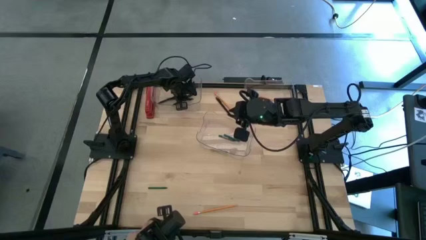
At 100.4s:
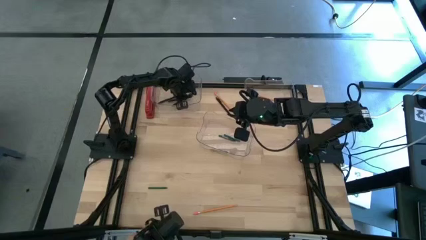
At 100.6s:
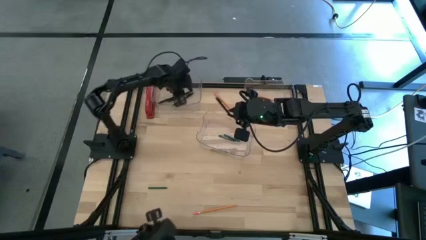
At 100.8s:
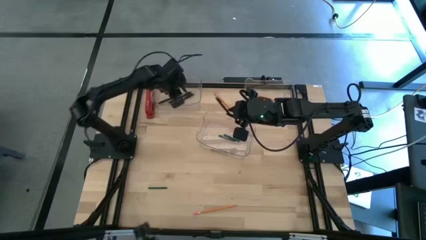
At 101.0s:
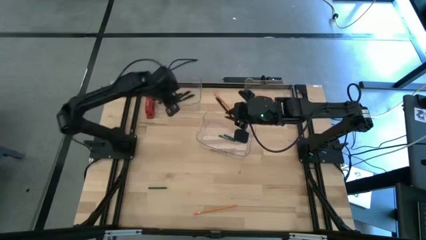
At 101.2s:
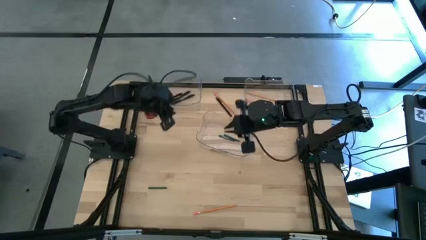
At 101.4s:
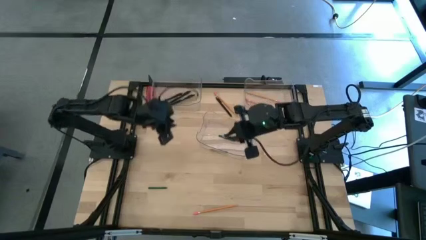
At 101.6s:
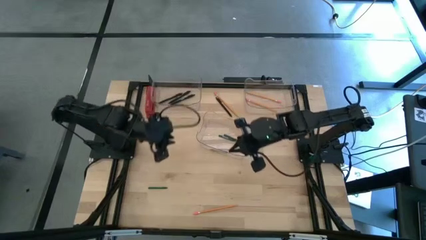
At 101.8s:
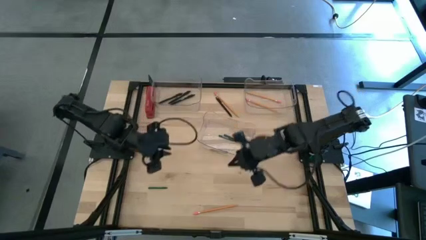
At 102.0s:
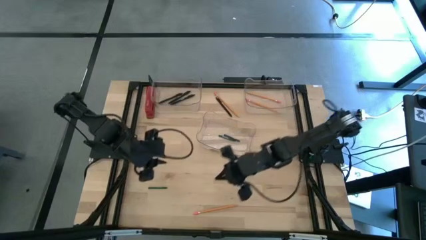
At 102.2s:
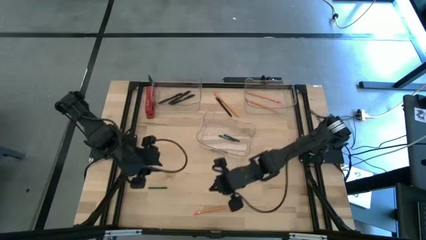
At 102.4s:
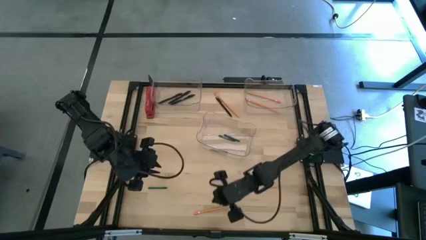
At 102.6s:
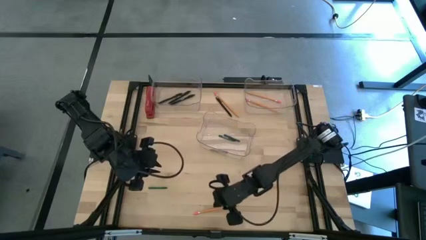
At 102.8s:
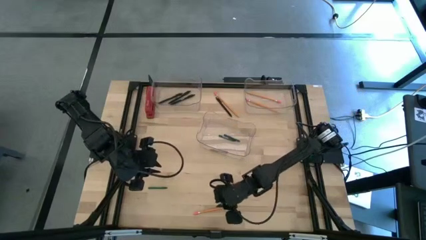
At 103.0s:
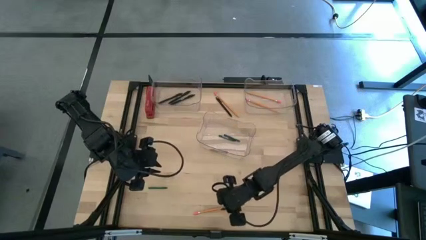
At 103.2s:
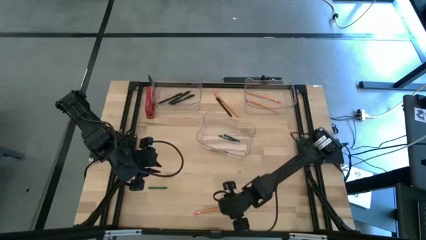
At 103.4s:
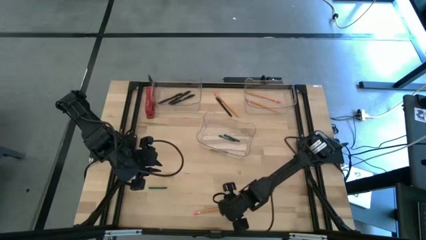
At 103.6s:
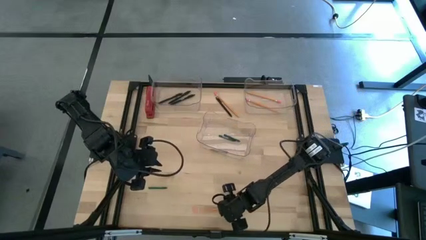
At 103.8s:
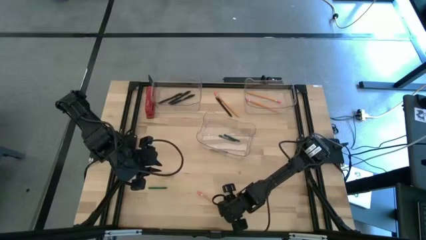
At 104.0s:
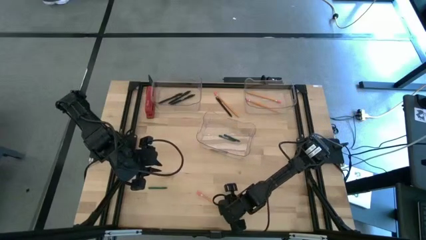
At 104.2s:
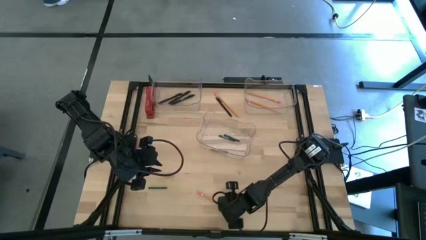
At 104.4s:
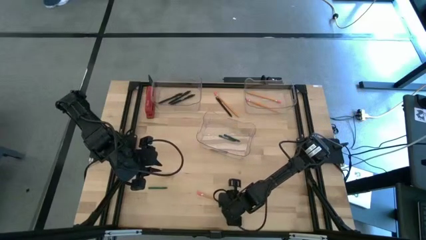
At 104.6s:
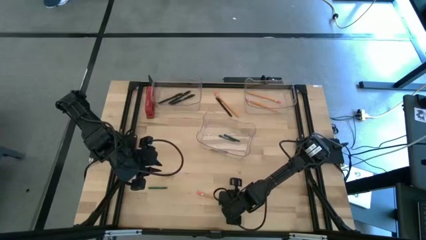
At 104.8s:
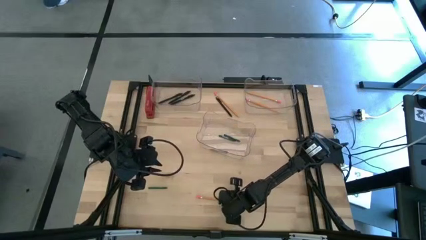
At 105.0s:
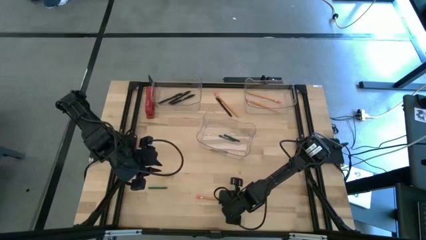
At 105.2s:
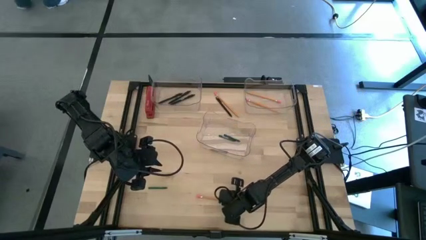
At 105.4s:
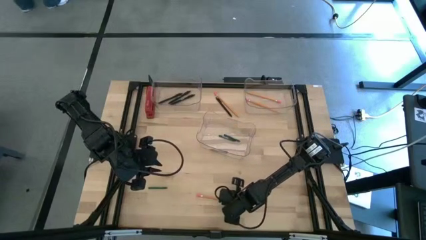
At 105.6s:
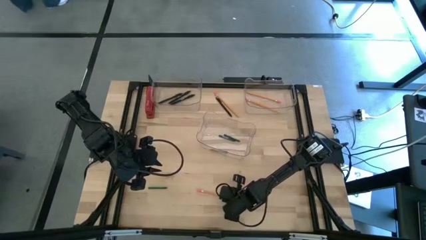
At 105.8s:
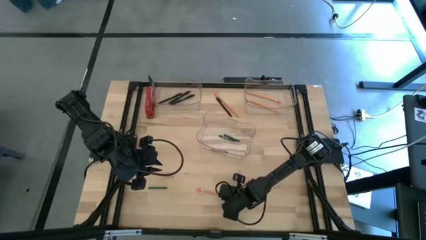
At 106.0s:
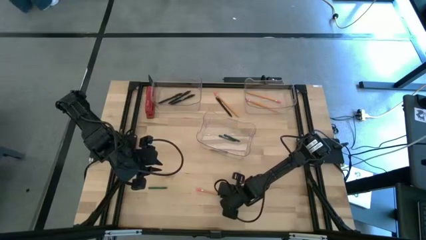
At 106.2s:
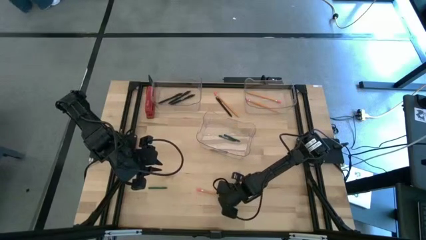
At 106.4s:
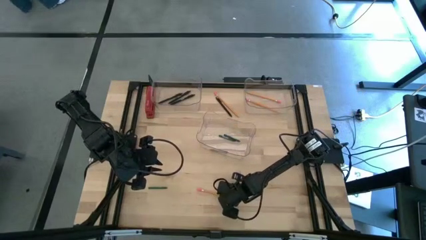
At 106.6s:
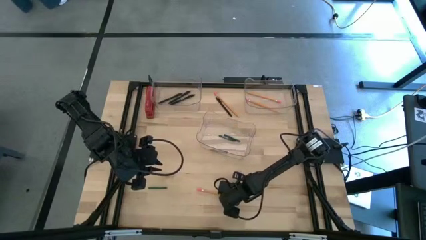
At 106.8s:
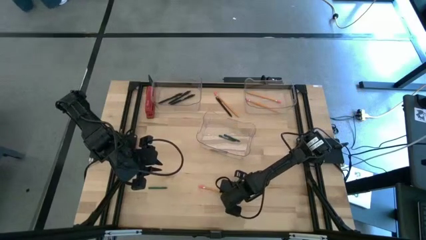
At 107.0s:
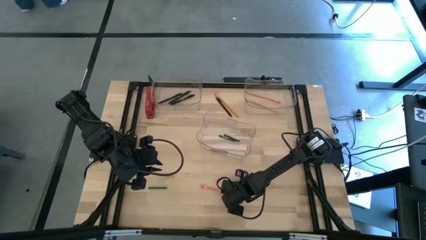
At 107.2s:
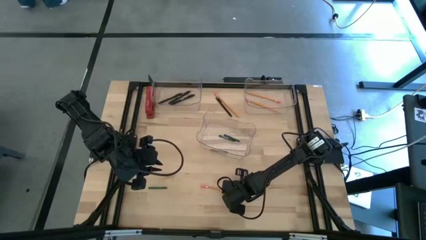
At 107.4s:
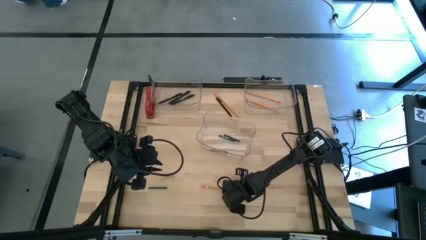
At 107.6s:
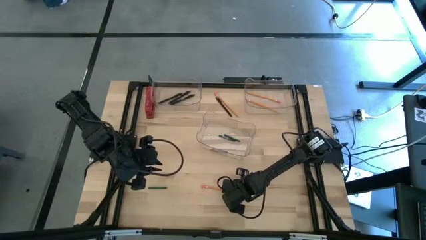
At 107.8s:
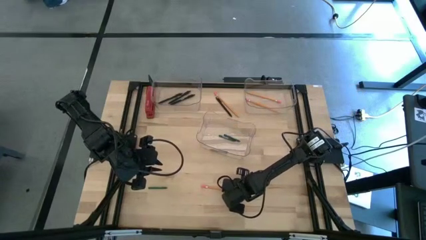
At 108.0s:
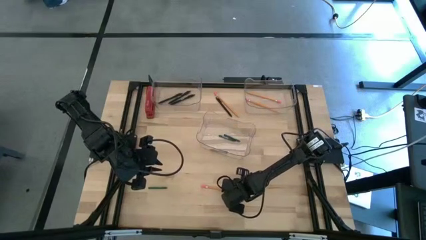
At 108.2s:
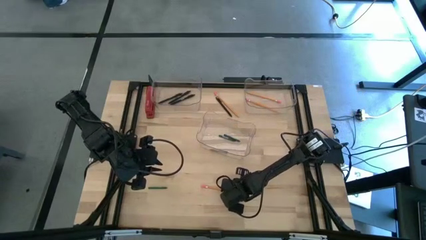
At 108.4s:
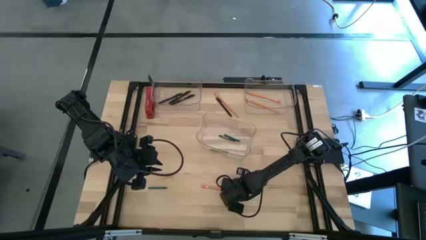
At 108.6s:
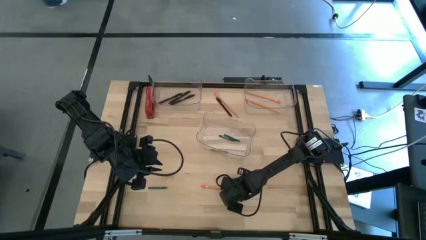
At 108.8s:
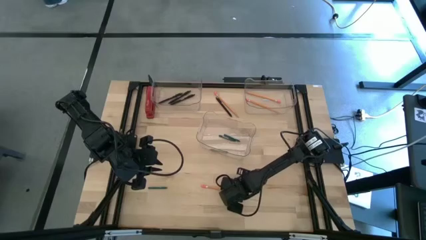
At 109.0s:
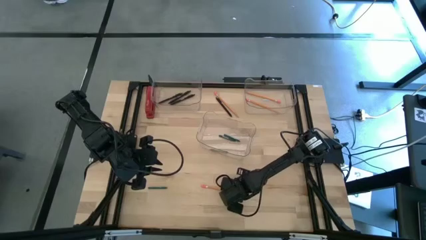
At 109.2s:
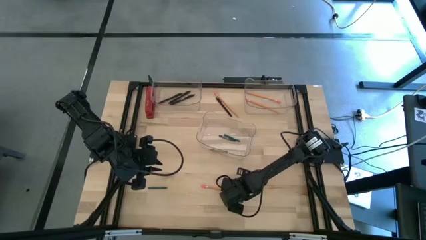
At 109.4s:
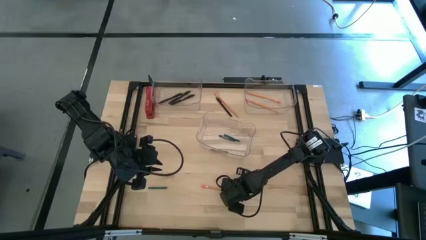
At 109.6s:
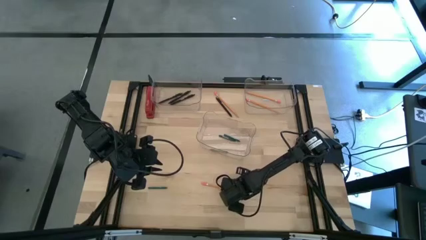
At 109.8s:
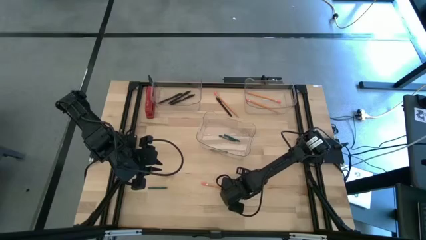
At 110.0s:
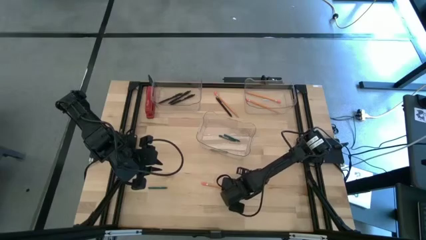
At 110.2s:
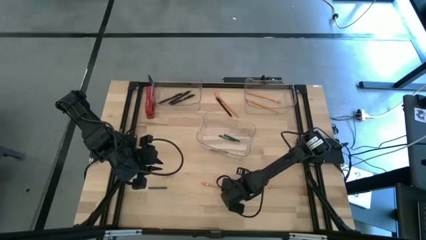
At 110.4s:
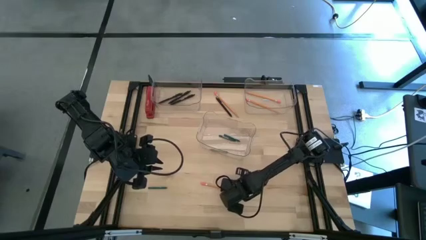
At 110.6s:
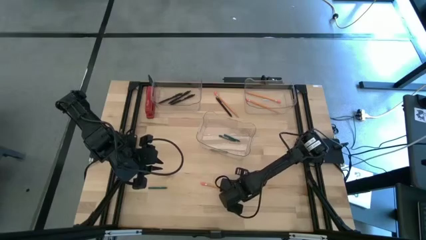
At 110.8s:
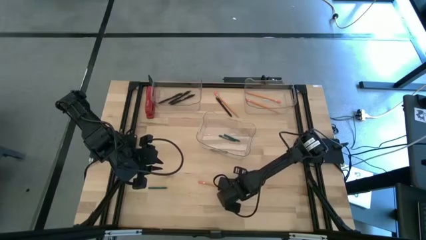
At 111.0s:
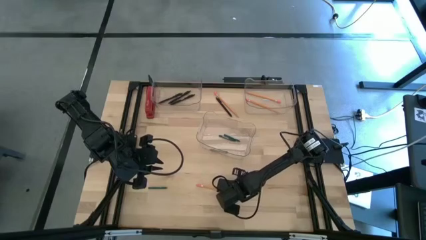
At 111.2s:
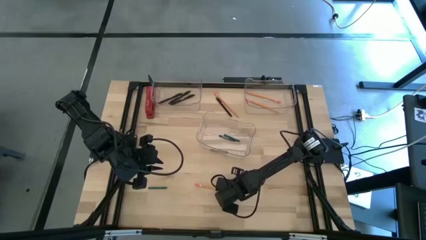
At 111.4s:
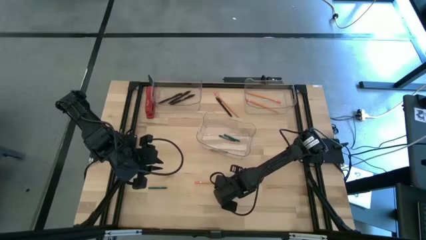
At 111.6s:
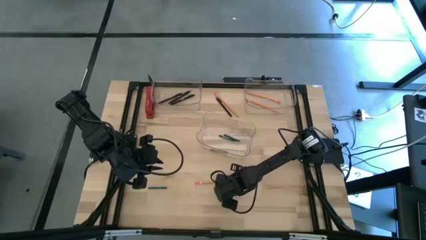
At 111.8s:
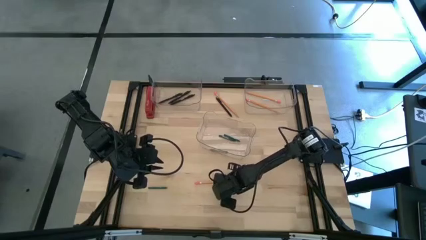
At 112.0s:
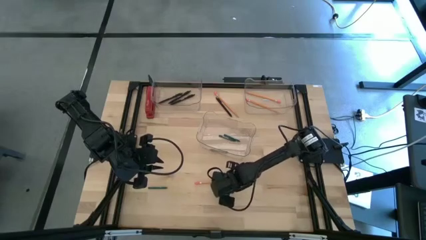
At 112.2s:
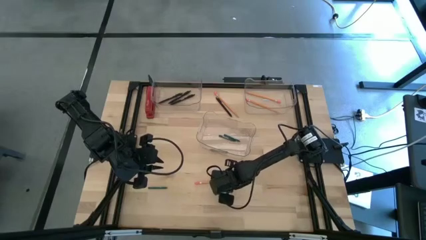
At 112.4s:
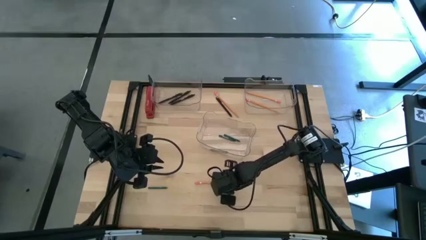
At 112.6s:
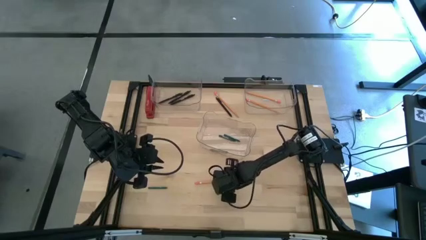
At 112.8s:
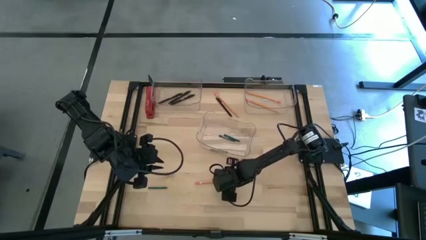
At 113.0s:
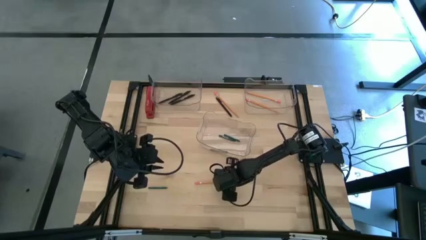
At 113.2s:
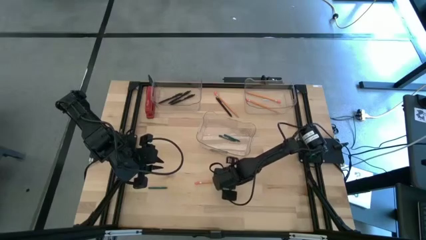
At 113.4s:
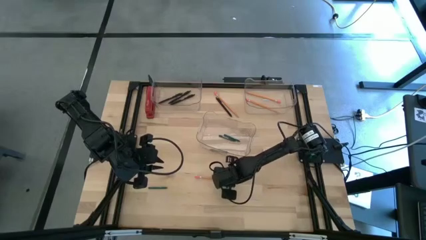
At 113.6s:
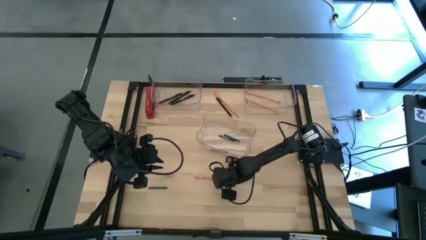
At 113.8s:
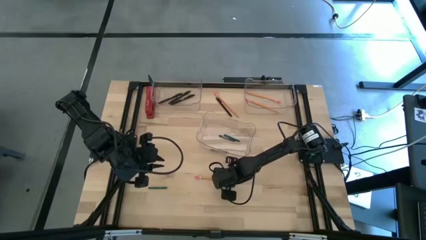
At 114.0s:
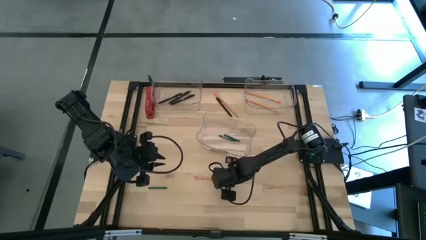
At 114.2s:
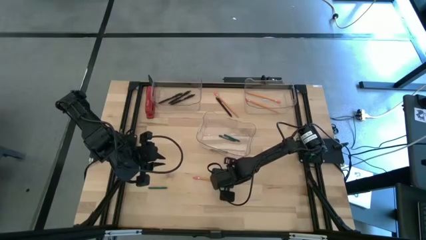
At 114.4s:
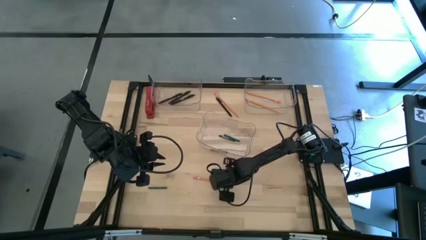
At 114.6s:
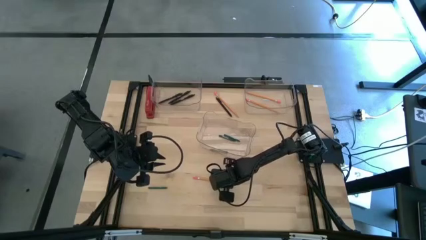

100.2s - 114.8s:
Task: Sort crayons/erasers/pens/pencils in bins
Put the orange pencil into the top right transparent bin

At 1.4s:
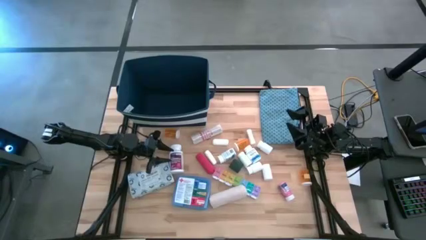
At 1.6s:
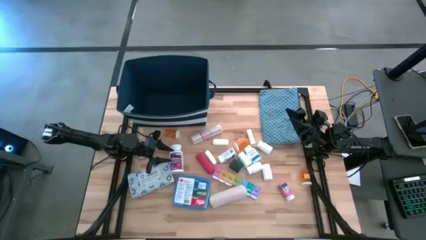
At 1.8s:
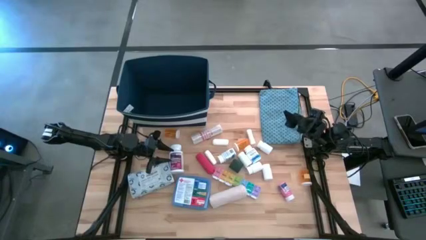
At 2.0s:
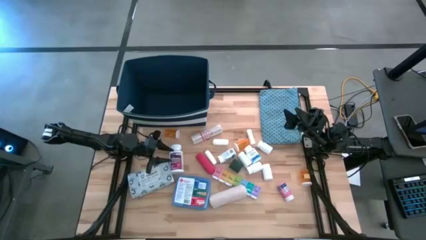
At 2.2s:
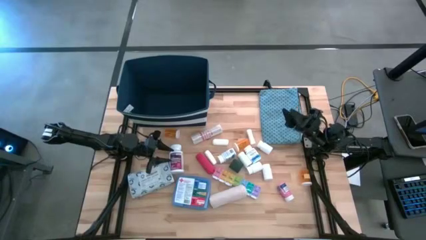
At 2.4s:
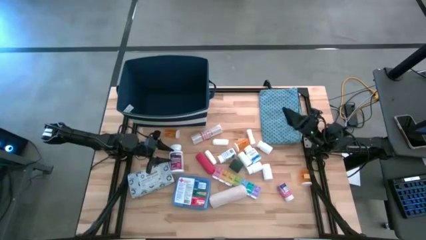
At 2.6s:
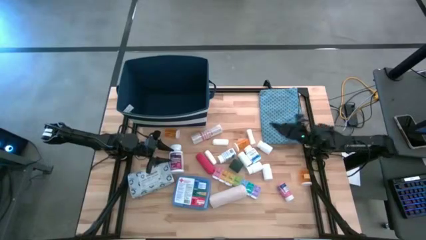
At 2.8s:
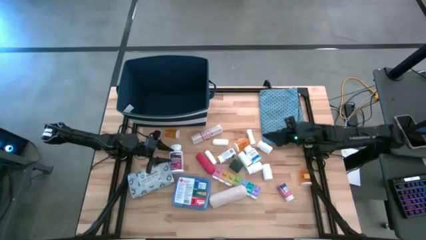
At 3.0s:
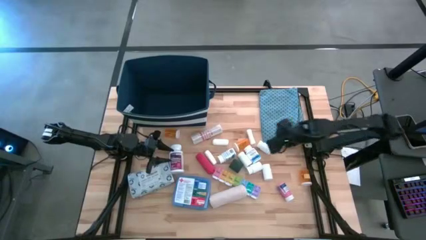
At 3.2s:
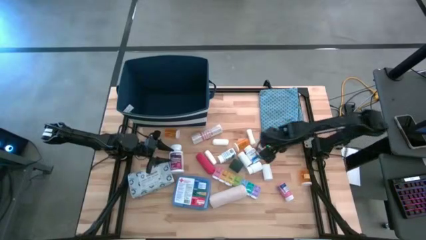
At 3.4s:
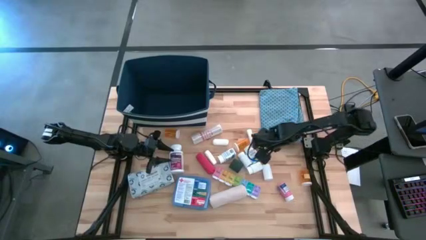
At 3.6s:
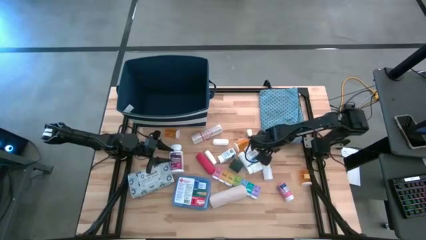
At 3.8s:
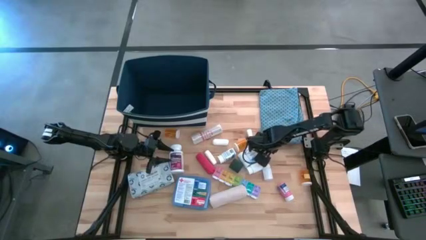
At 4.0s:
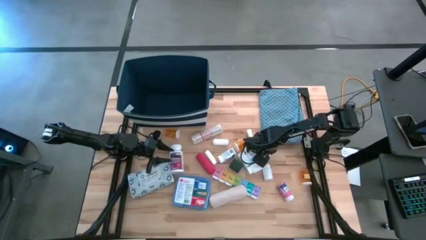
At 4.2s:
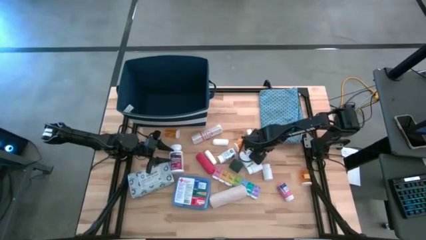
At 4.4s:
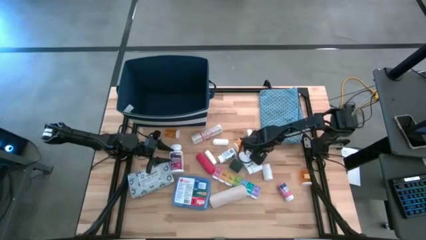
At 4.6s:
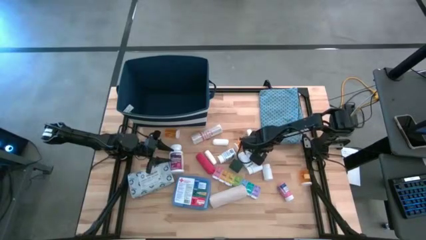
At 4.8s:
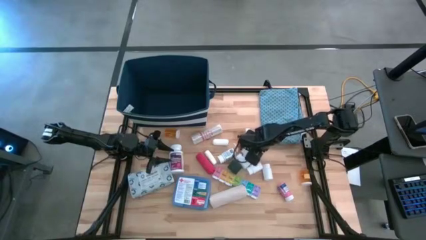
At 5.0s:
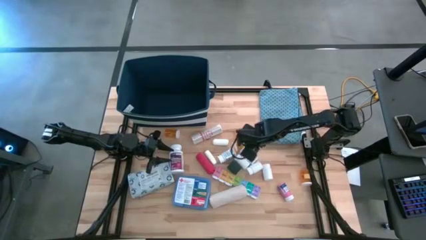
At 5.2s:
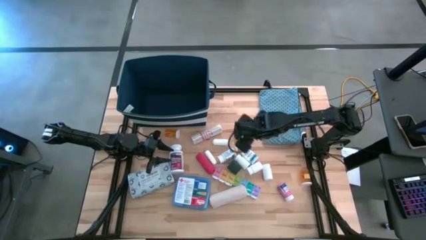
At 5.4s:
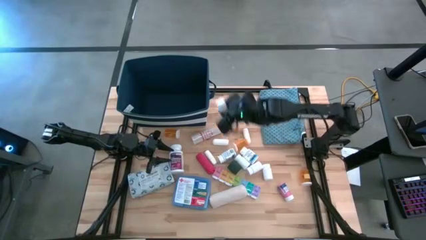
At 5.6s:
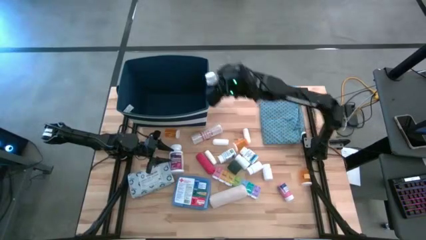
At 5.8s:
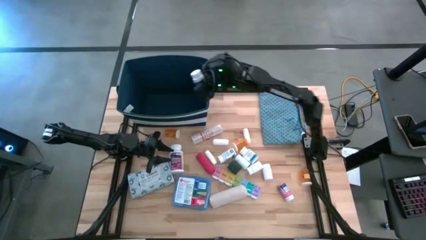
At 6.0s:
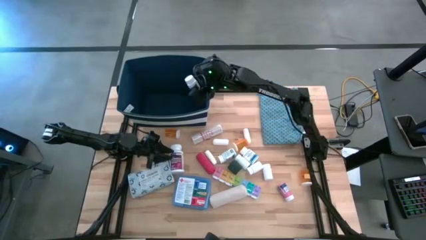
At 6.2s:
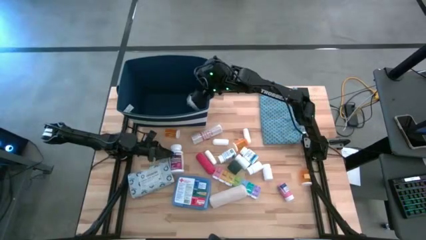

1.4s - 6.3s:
Task: Pick & place medical supplies in basket/bin
Put the top white medicine bottle into the blue bin
